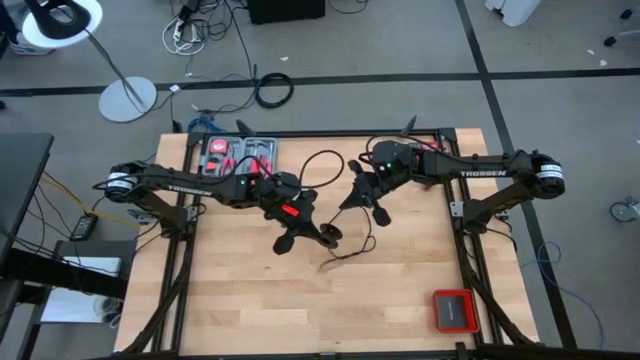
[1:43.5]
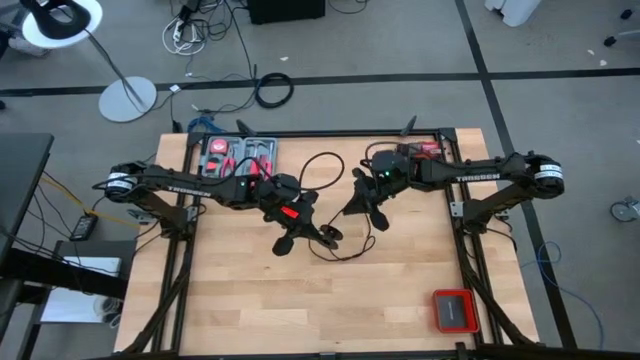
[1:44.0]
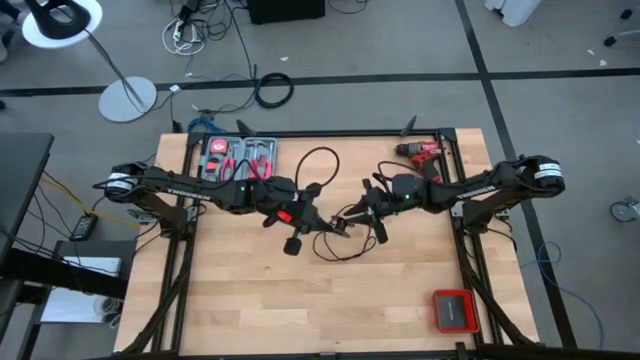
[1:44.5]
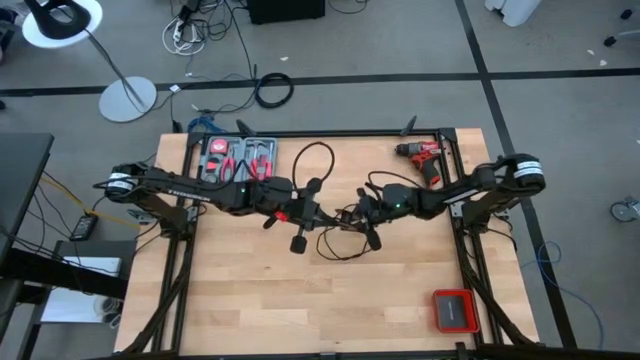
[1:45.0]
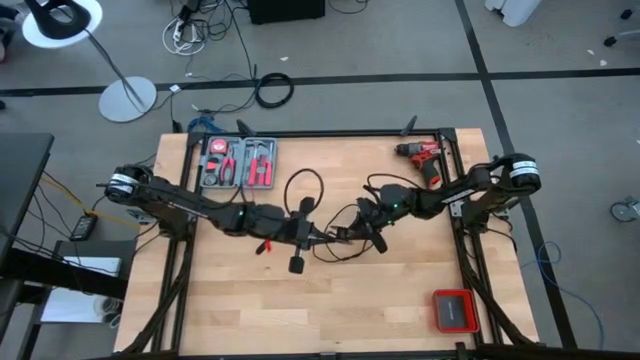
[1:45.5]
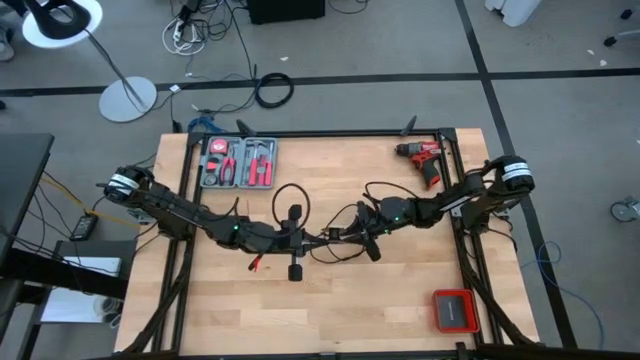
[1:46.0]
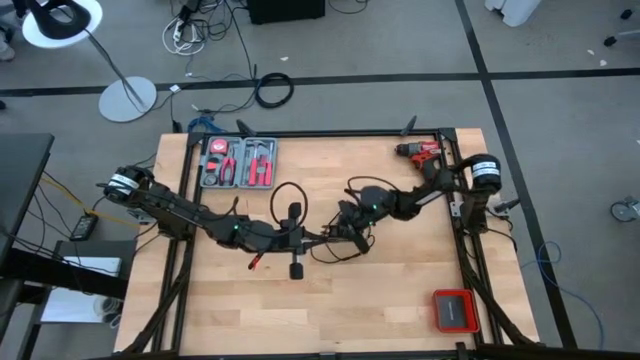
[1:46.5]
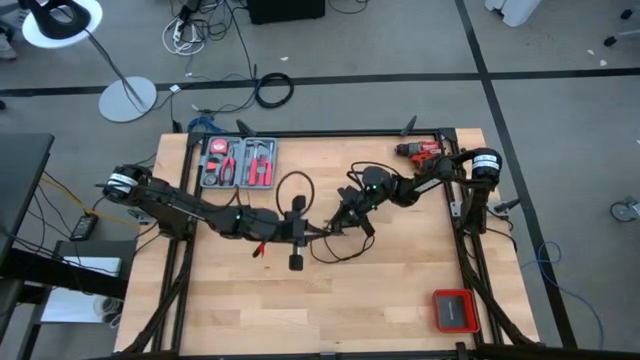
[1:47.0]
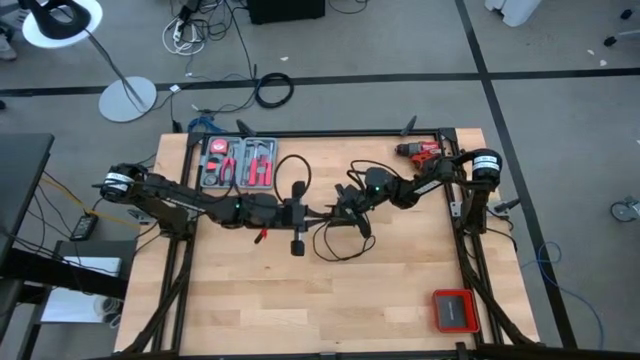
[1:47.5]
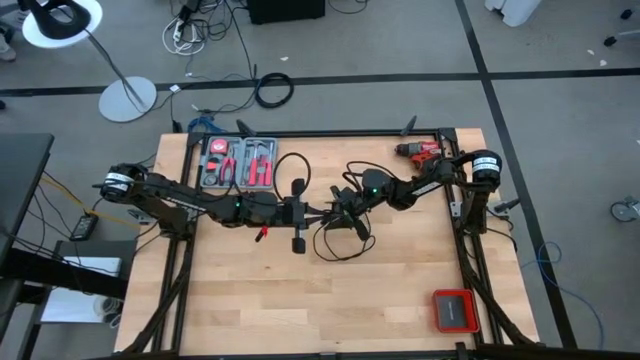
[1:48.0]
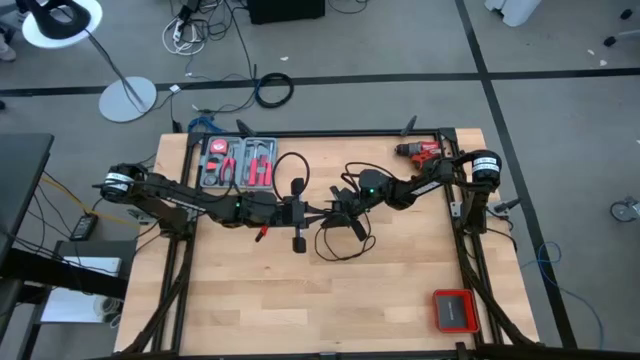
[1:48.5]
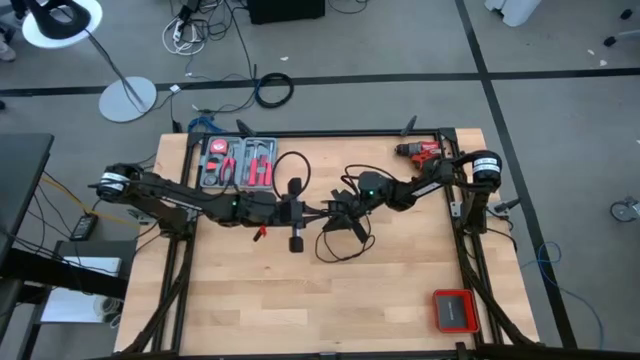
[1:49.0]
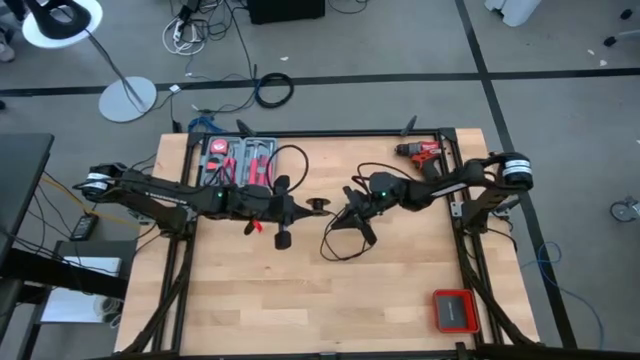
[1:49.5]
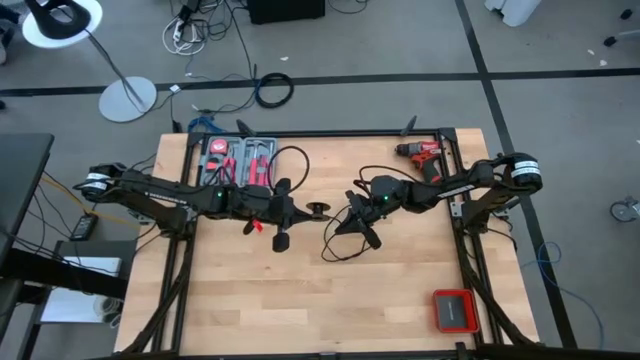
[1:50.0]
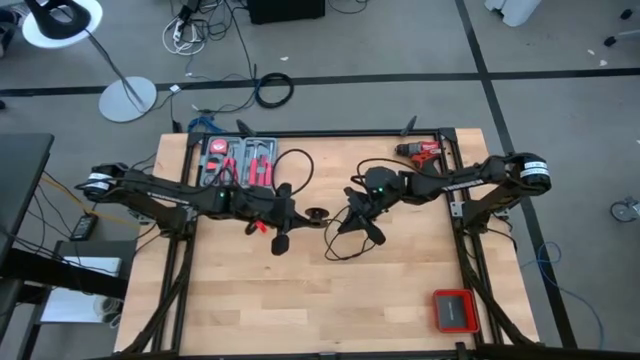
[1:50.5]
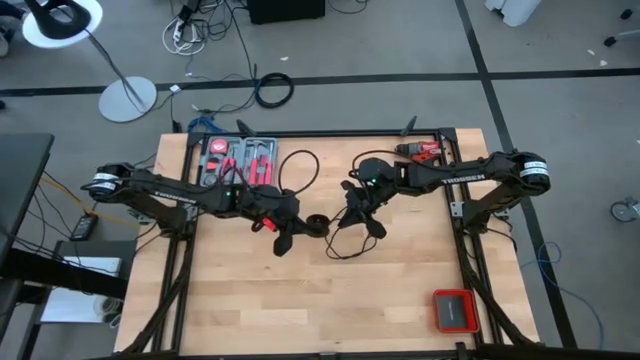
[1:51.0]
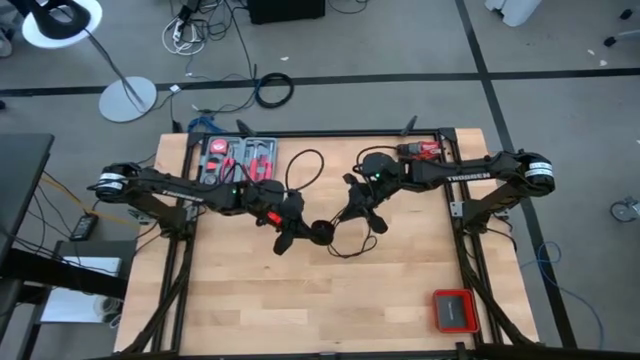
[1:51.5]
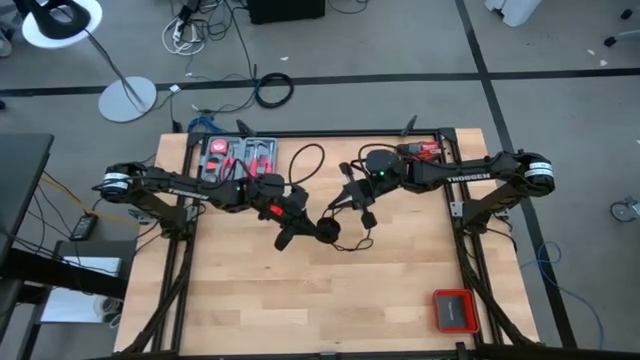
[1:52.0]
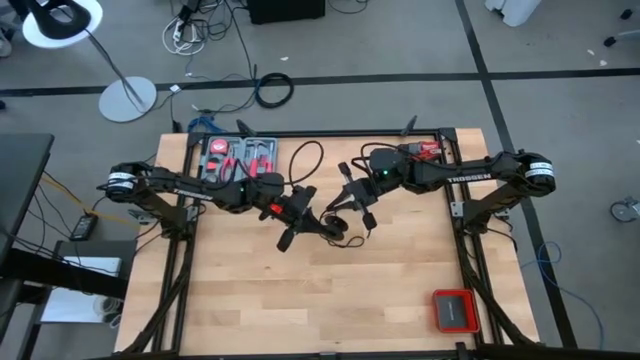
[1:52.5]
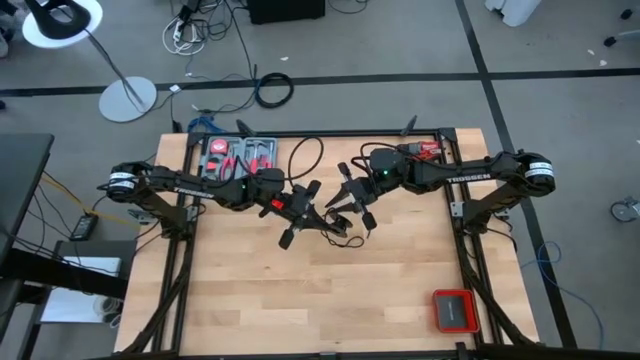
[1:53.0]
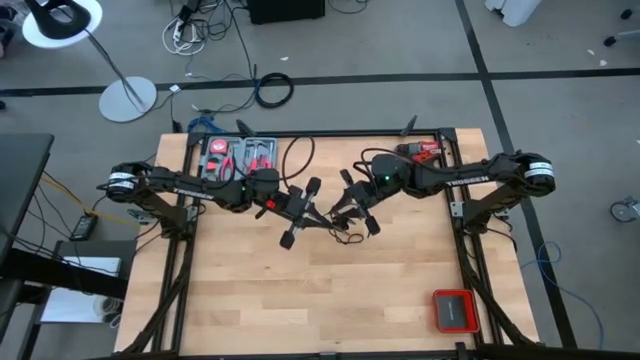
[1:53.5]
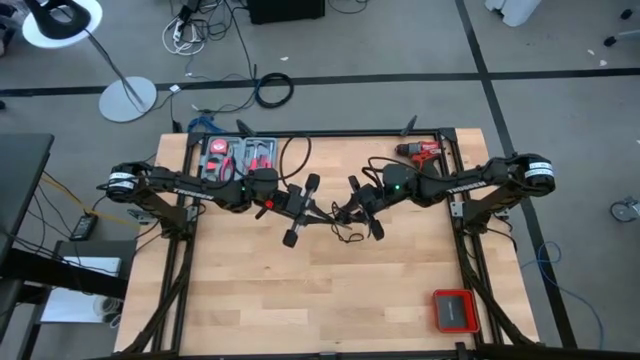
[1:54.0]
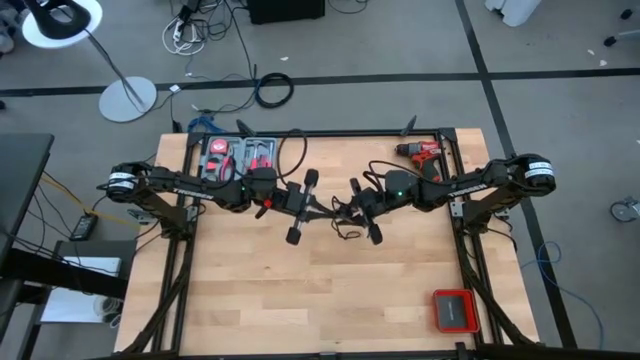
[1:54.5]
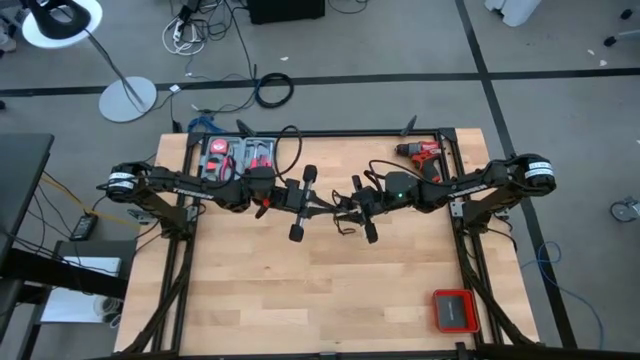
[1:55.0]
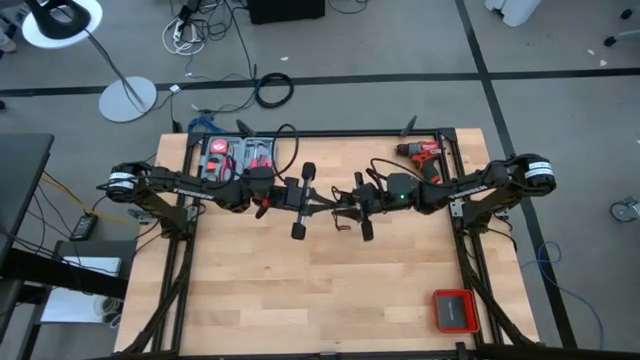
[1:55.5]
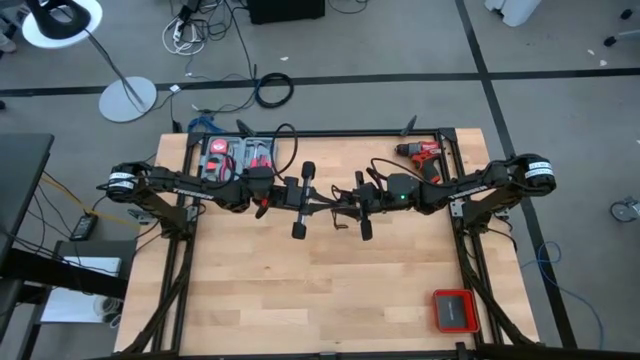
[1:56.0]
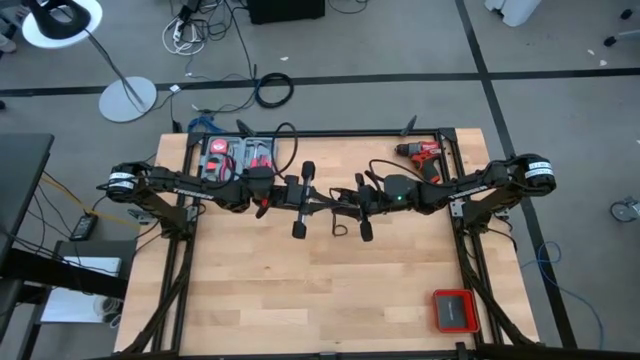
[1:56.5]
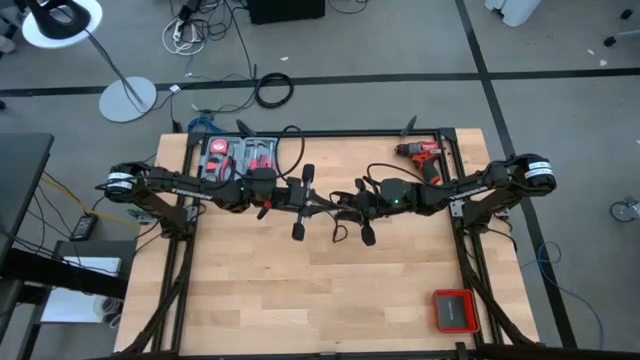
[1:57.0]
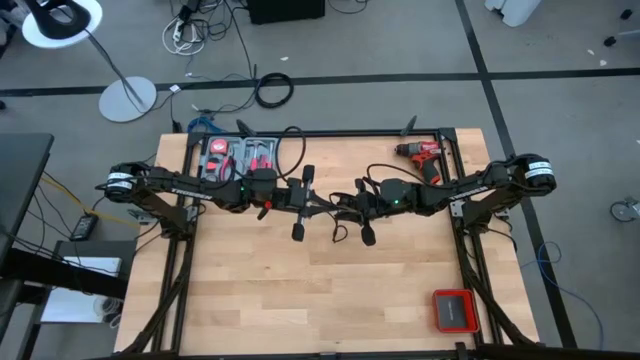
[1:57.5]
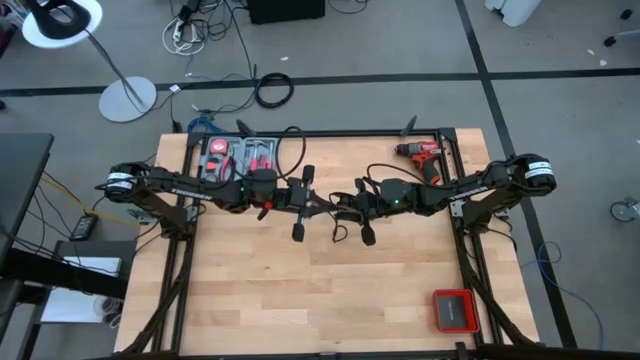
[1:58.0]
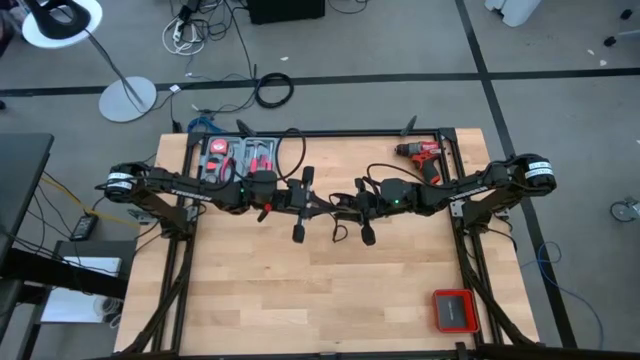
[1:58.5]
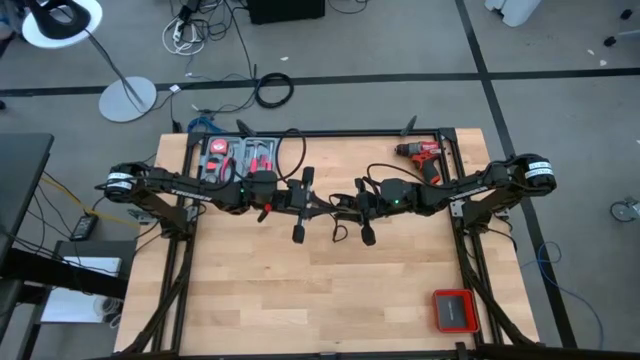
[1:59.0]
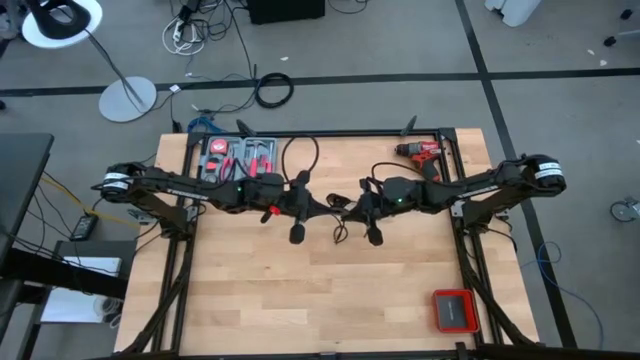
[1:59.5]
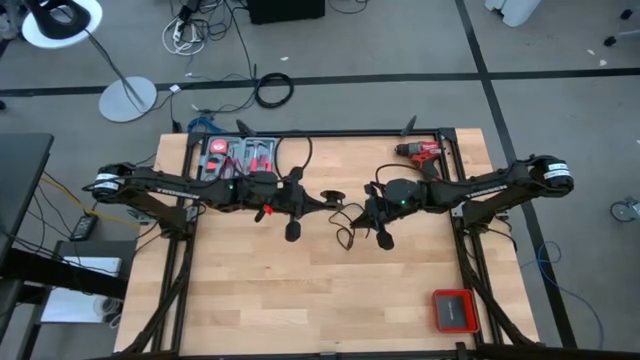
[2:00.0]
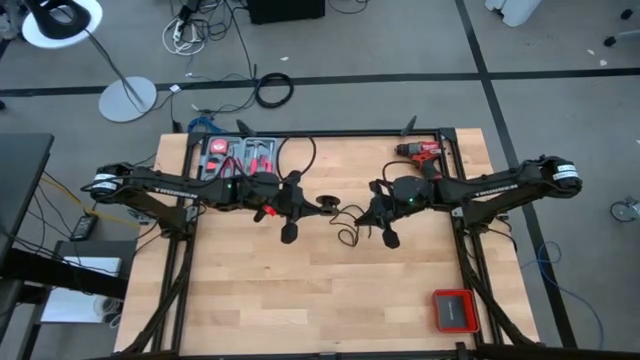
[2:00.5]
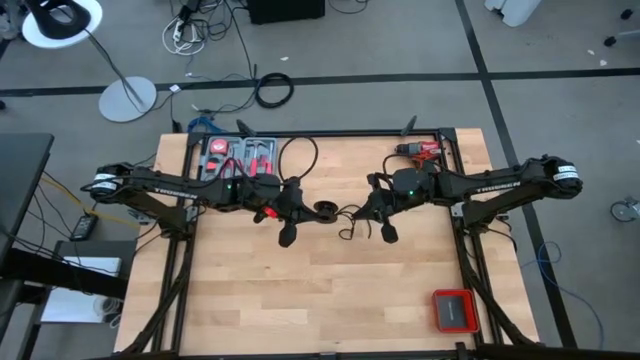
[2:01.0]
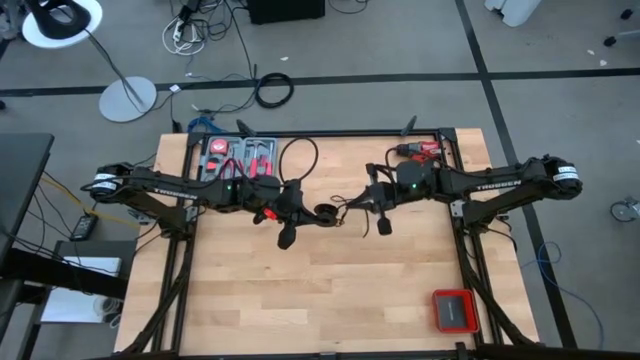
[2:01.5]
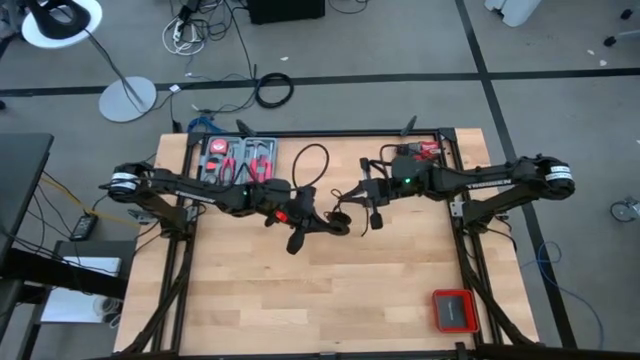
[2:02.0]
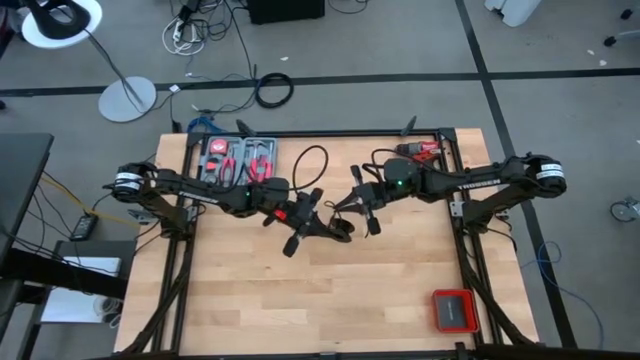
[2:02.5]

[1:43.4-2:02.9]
Task: Coil cords
Coil the black wire on the black spool

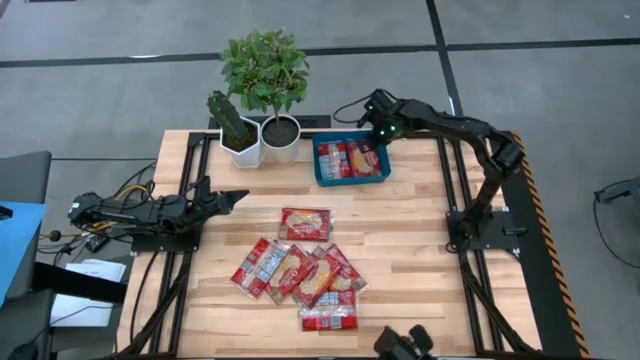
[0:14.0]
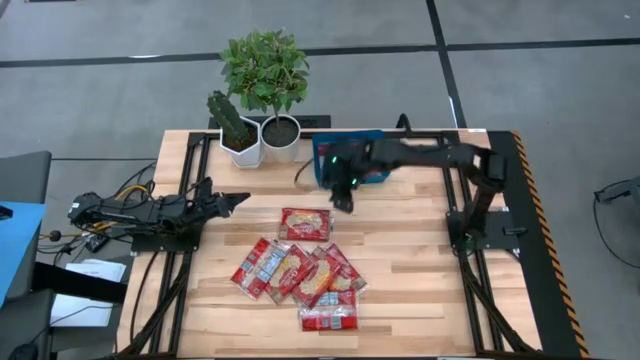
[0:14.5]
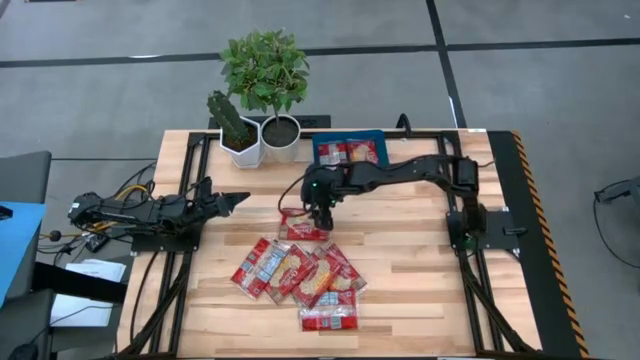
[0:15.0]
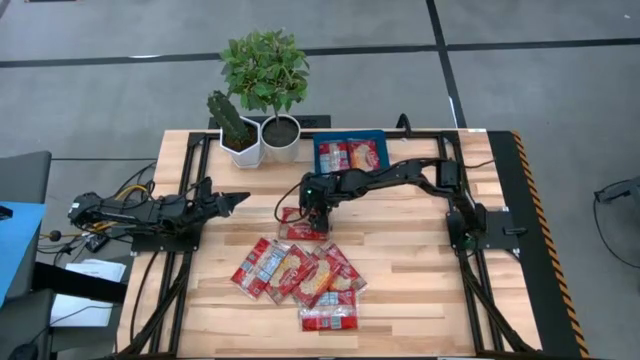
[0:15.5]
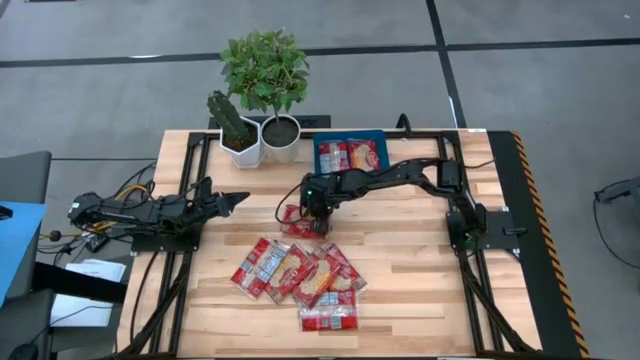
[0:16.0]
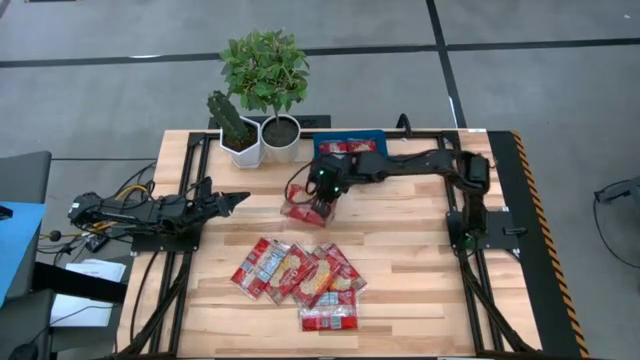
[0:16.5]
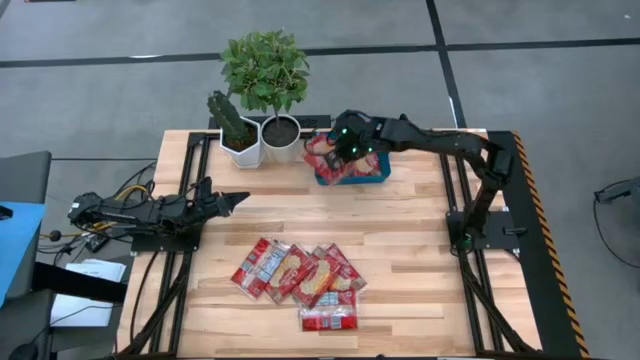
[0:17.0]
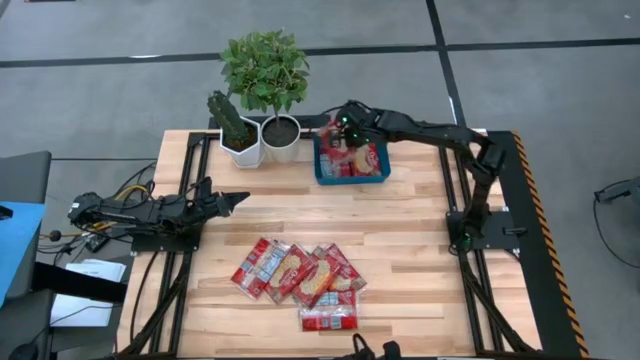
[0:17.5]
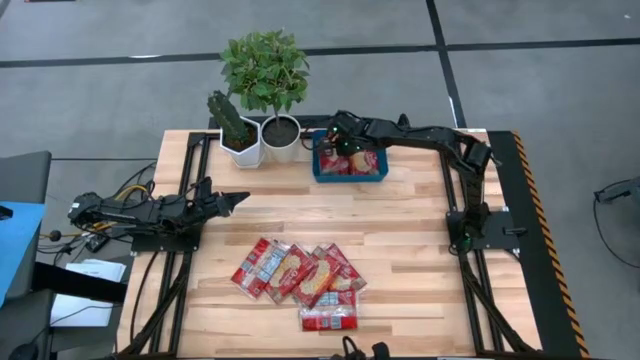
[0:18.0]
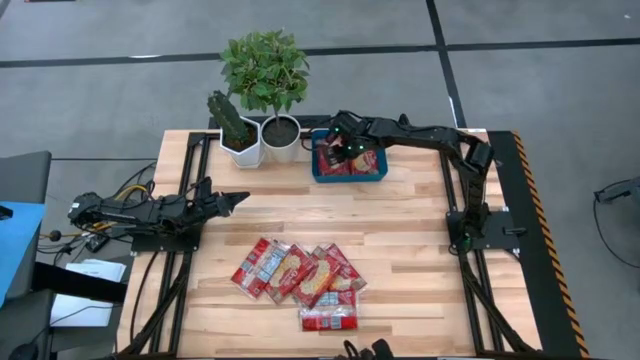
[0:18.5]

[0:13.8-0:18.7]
Task: Sort popcorn bags into baskets
Put the red popcorn bag into the blue container
